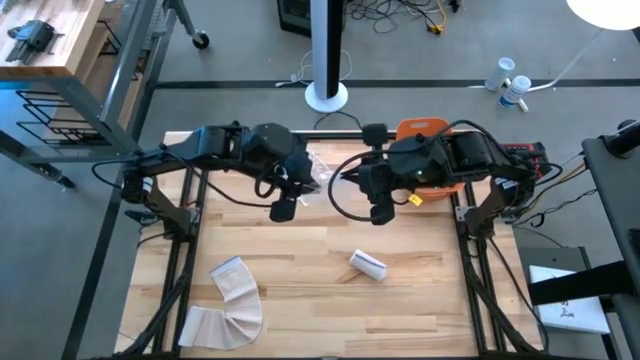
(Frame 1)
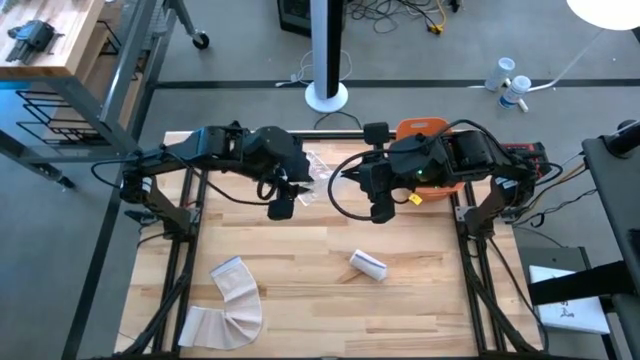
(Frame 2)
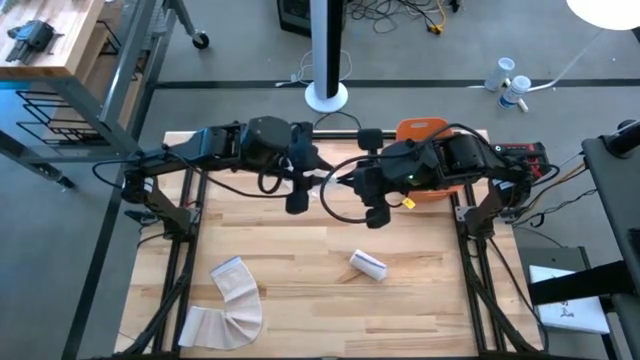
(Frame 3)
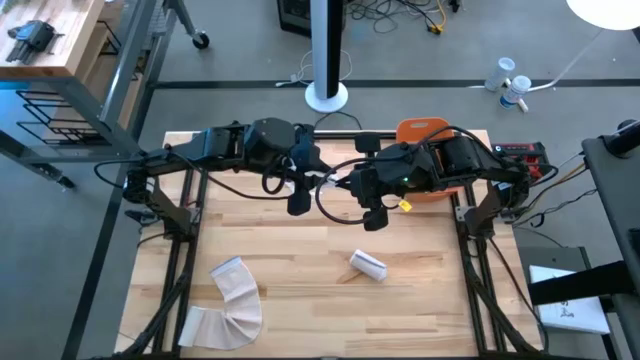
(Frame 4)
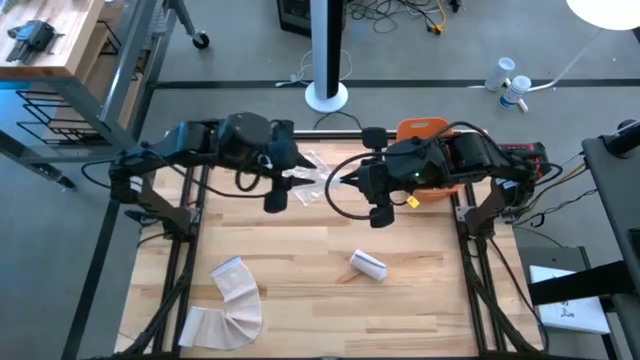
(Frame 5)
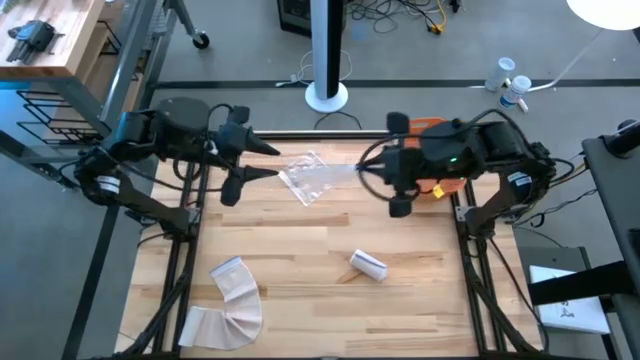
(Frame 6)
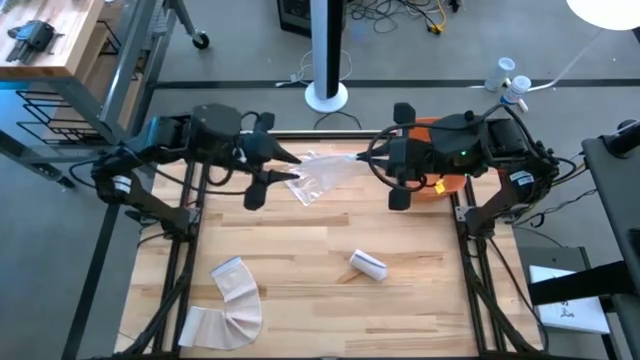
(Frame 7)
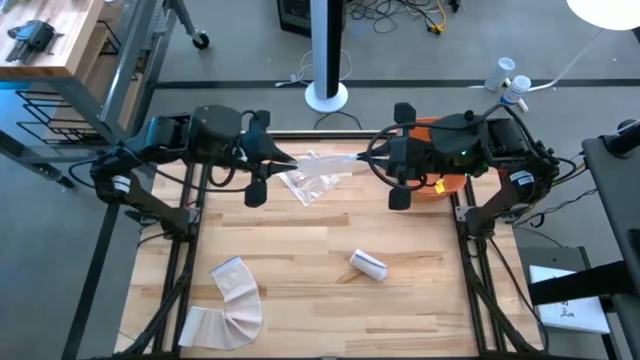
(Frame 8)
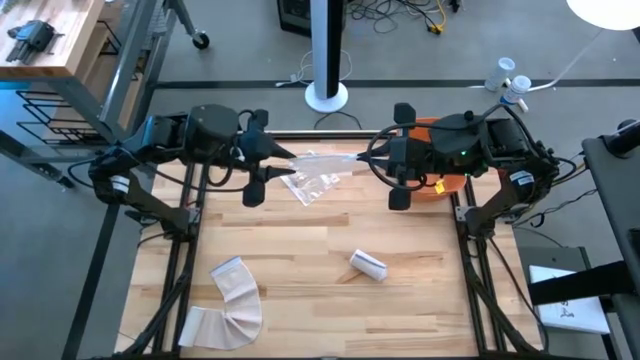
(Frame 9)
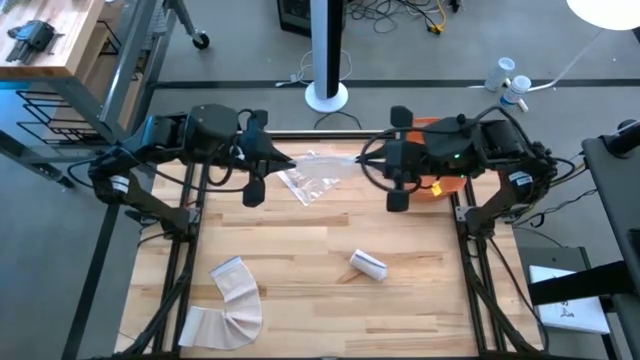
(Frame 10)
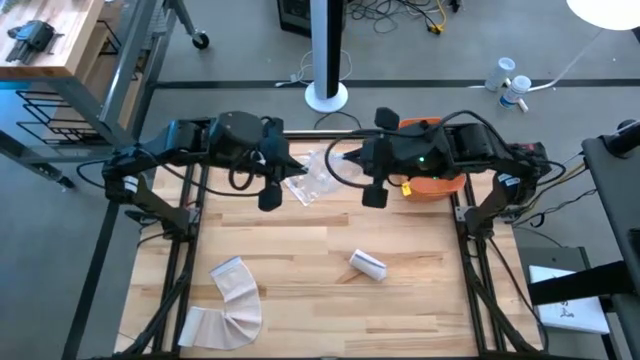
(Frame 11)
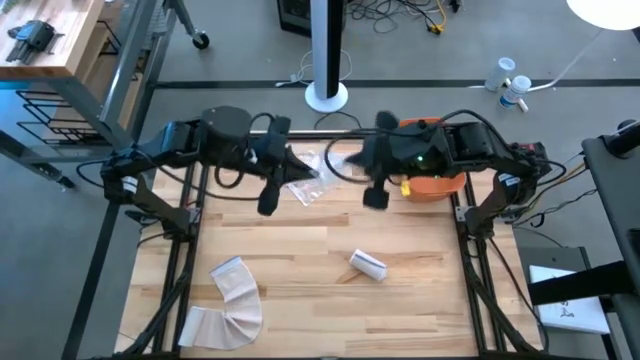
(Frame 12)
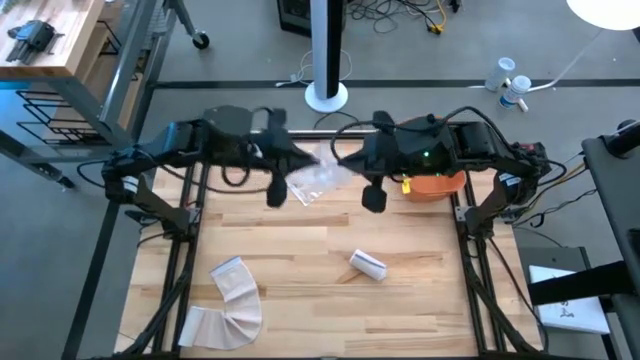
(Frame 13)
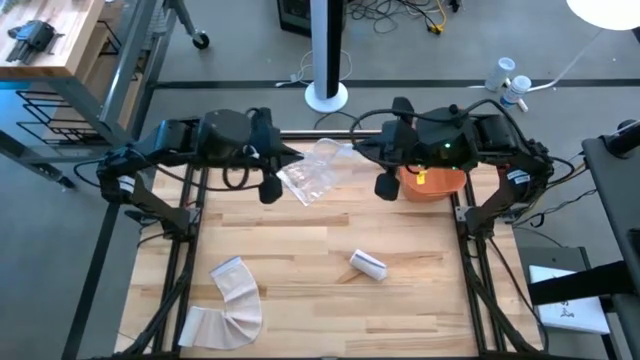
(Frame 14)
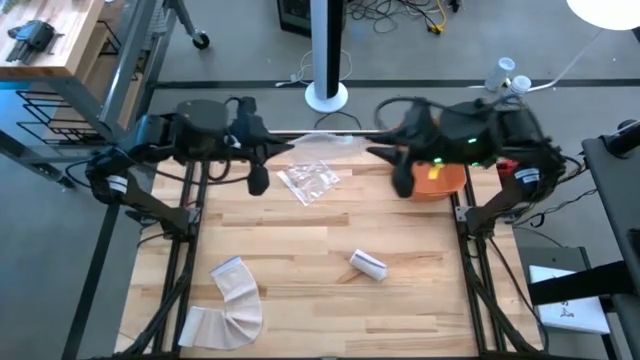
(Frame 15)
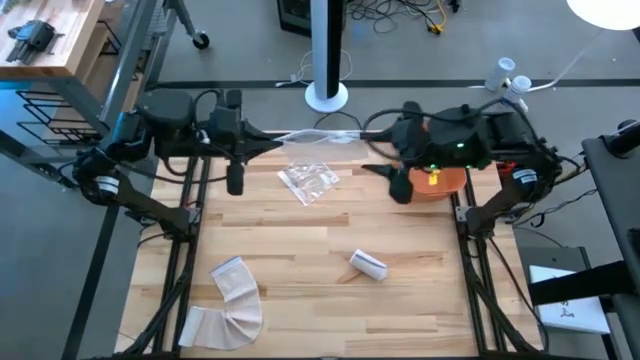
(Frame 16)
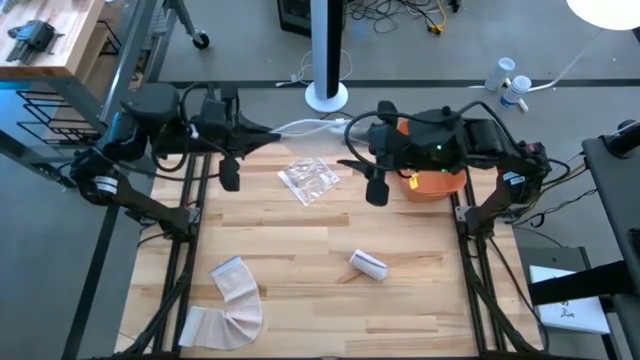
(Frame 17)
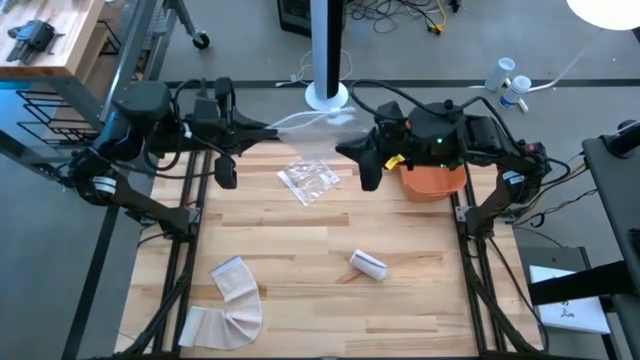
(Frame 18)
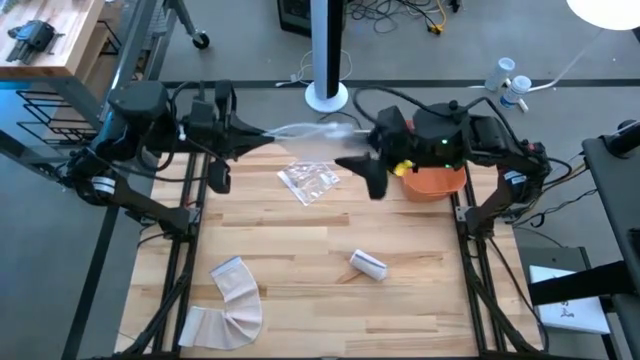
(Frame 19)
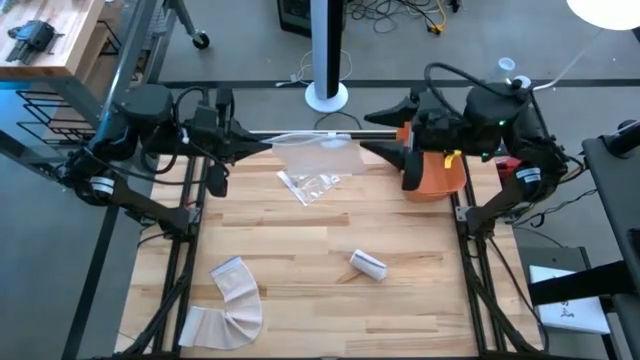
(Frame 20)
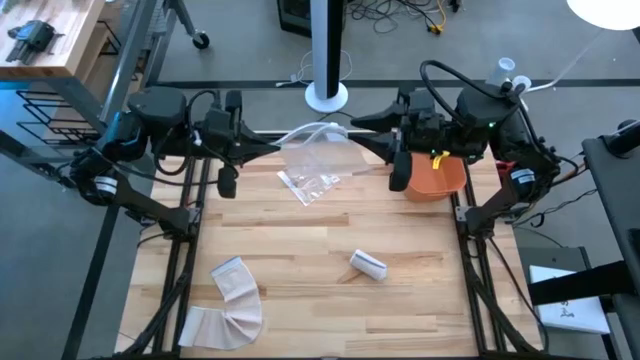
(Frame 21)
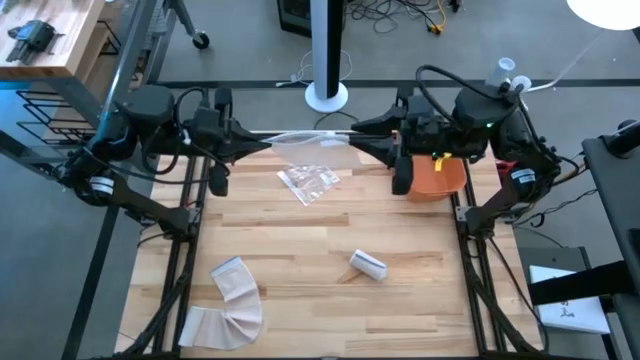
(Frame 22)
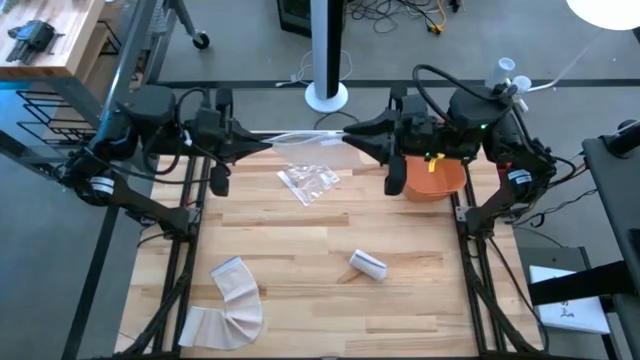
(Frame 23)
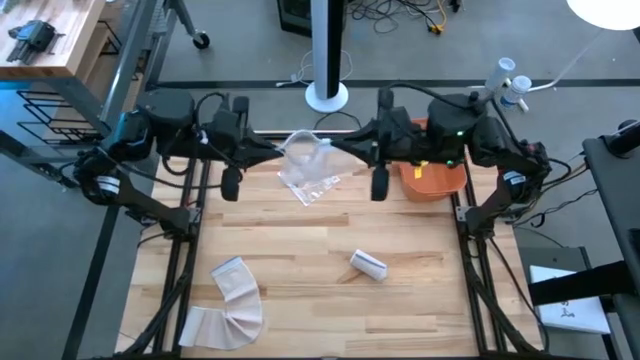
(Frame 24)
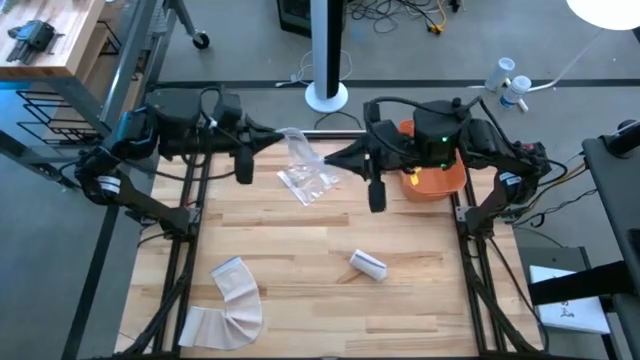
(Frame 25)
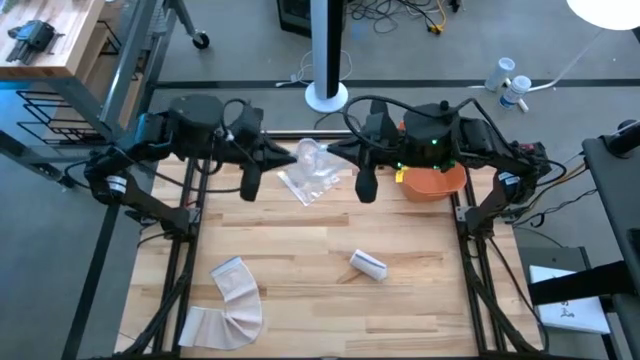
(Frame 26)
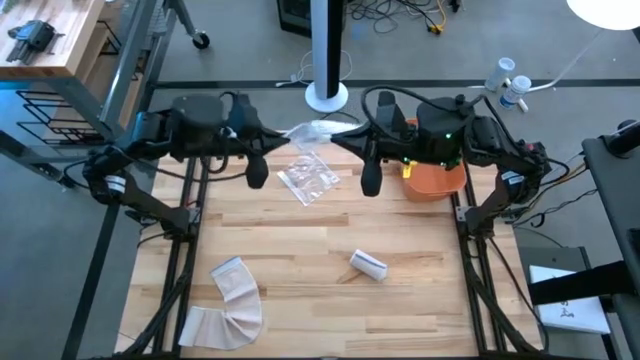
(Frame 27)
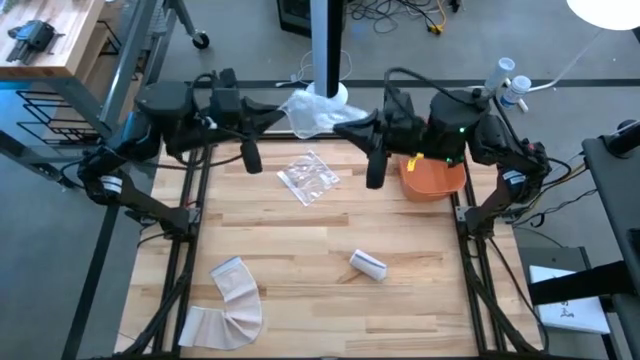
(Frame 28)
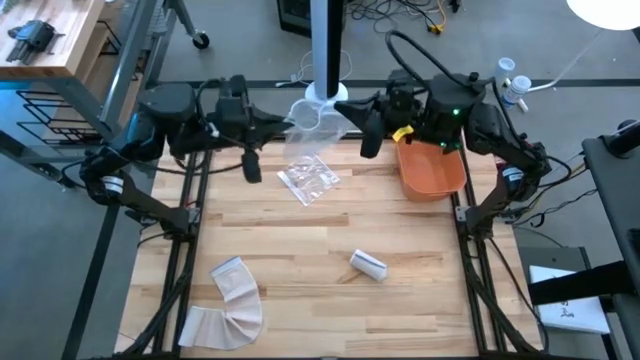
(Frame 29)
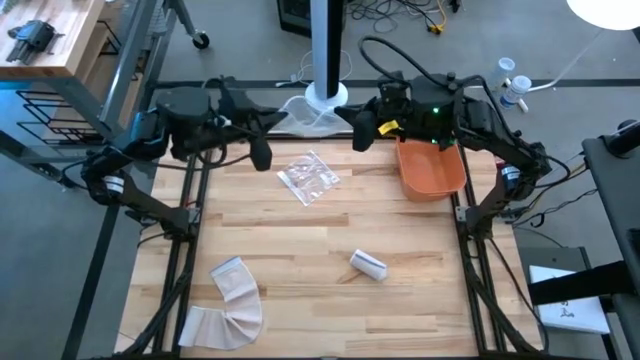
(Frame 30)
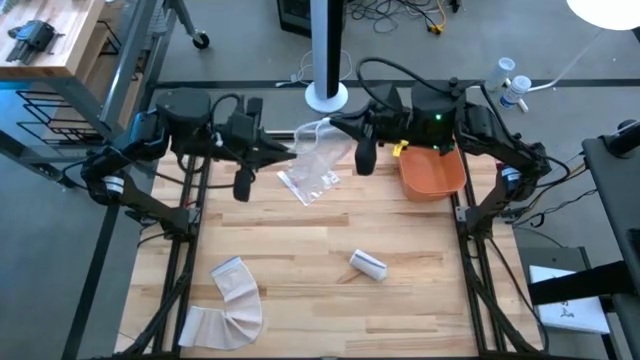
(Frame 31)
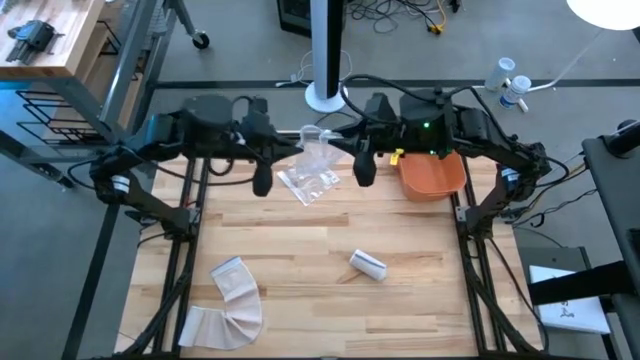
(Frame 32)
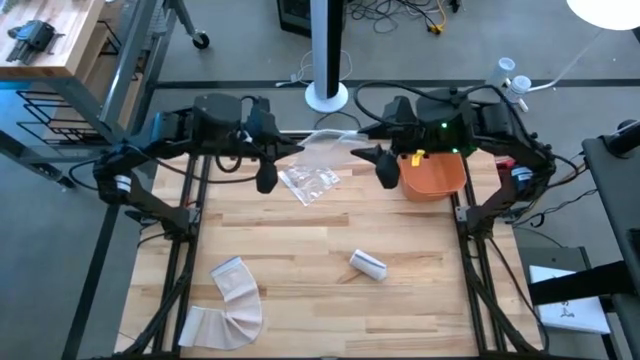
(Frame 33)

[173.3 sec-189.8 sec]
Task: Roll bandage
Open the transparent zip bag

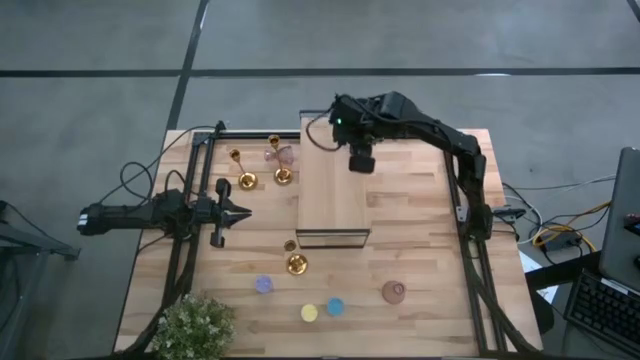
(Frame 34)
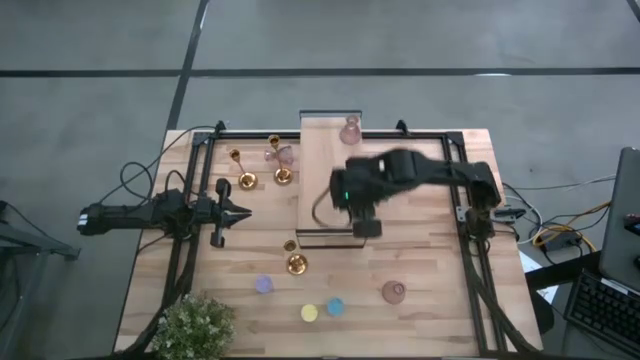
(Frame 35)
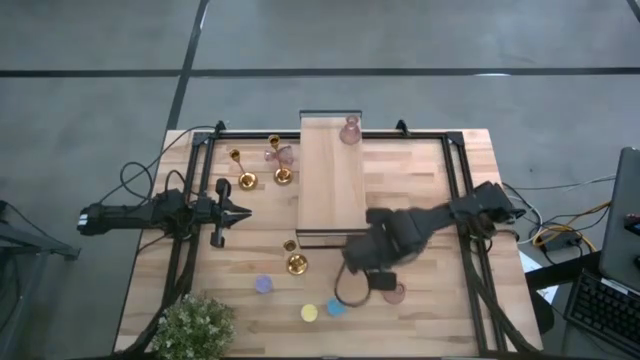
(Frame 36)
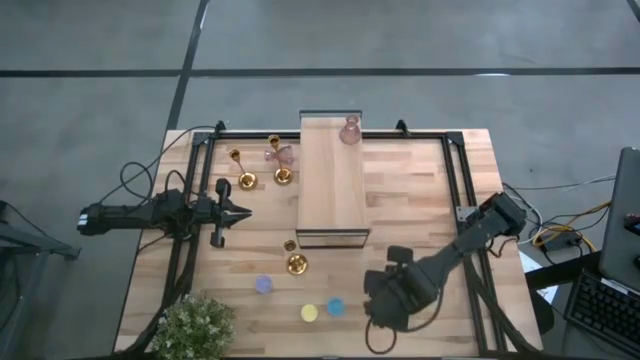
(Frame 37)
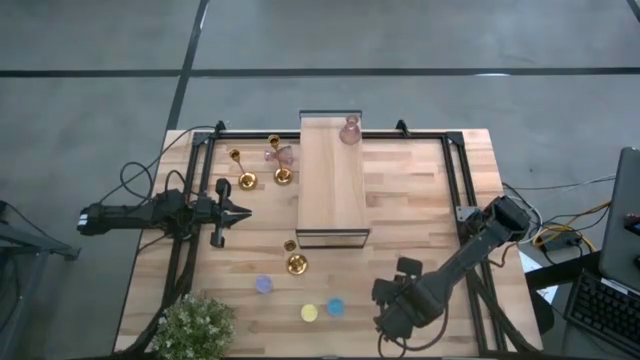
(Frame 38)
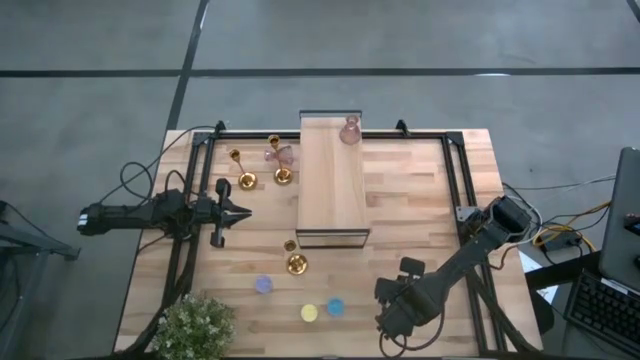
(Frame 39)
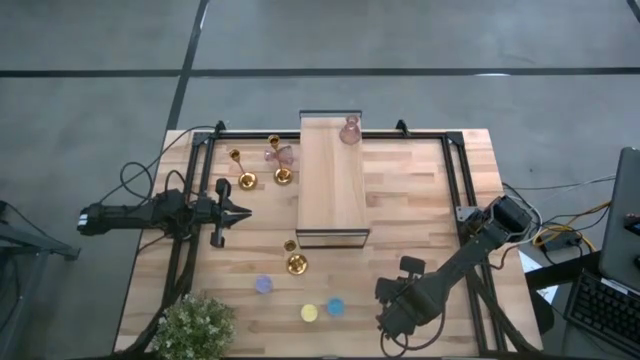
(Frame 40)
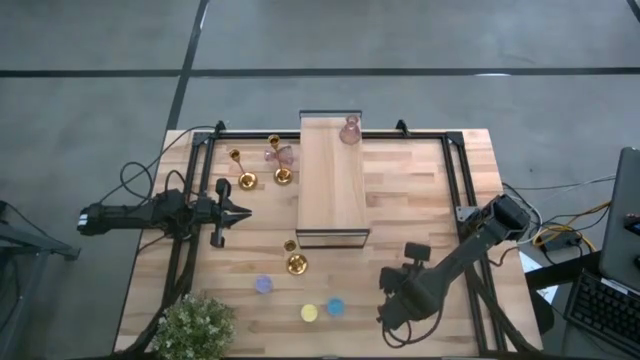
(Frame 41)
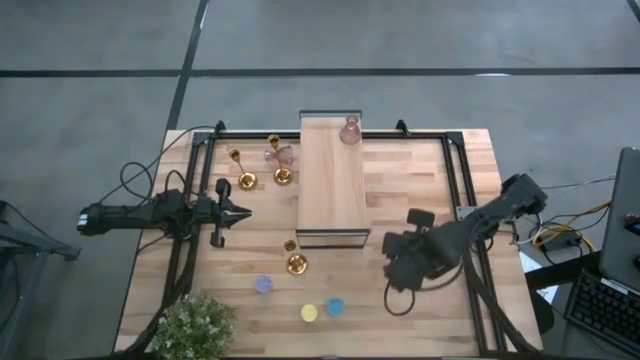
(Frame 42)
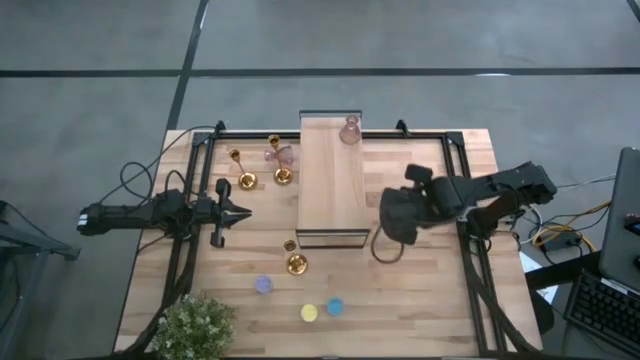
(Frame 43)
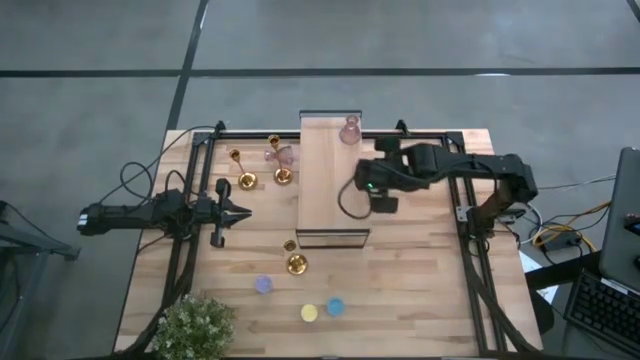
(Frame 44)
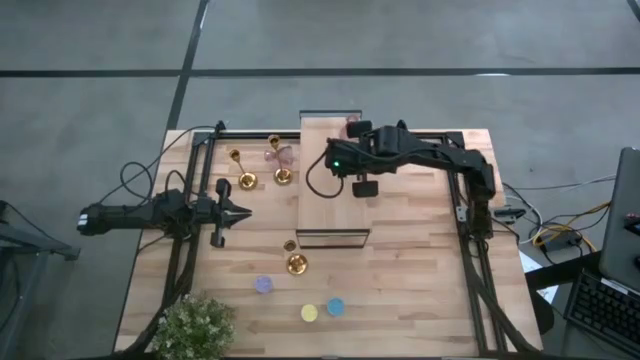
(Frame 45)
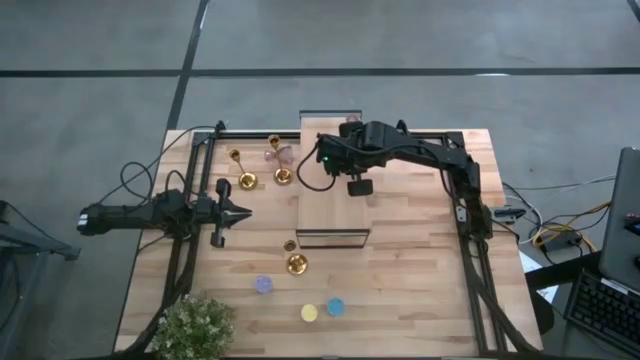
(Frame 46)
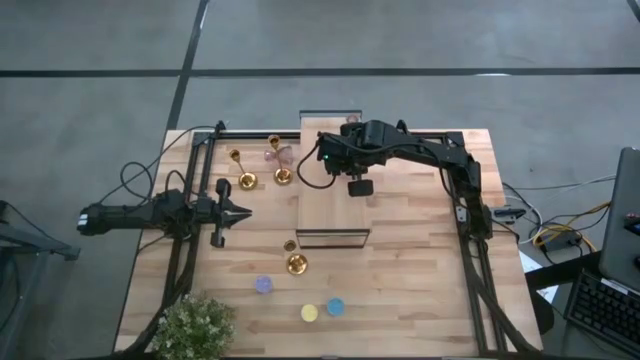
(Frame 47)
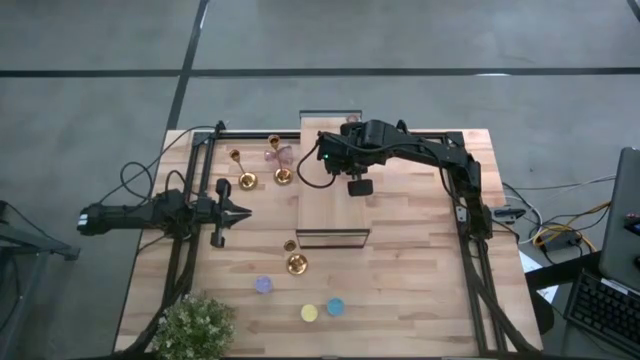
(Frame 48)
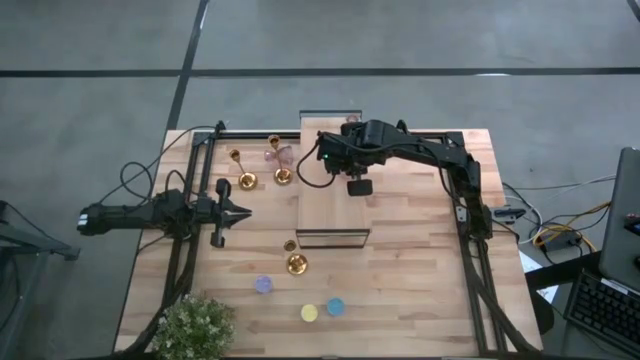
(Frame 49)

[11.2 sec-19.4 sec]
Task: Pick & Place candle stick holders
Put the bottom purple glass candle holder on the shelf
